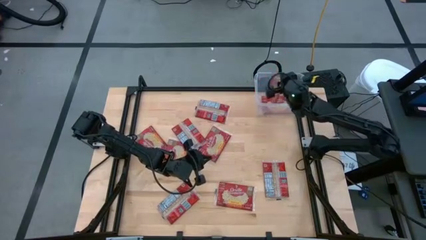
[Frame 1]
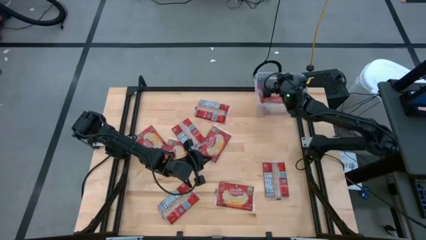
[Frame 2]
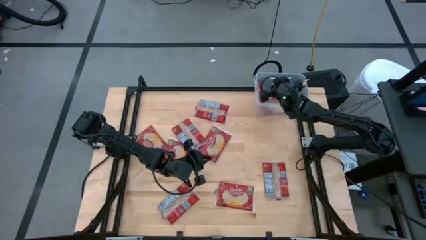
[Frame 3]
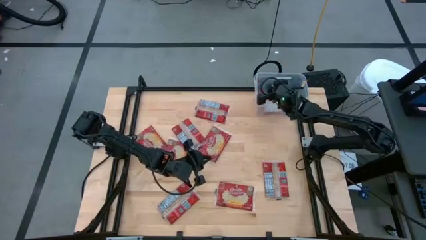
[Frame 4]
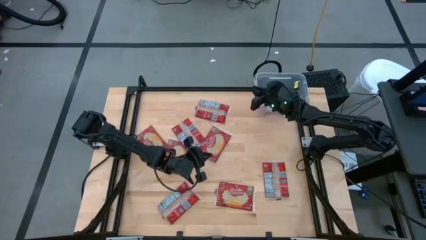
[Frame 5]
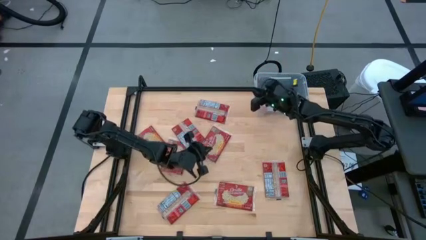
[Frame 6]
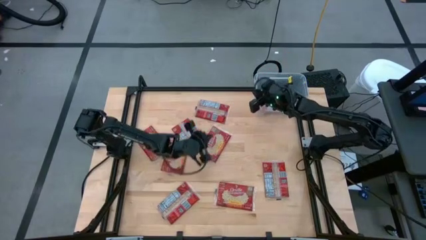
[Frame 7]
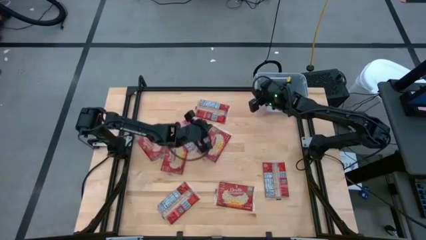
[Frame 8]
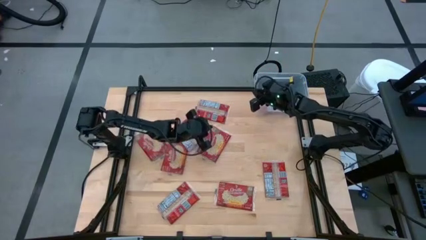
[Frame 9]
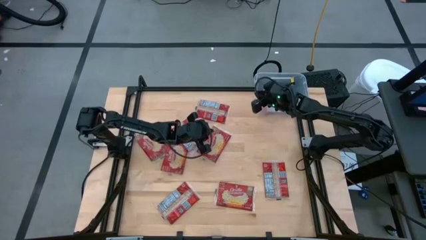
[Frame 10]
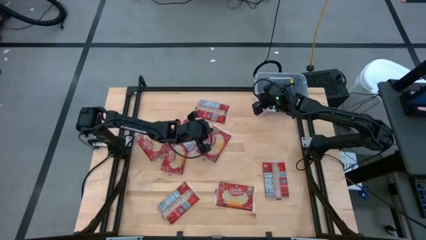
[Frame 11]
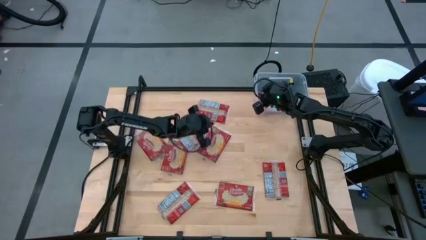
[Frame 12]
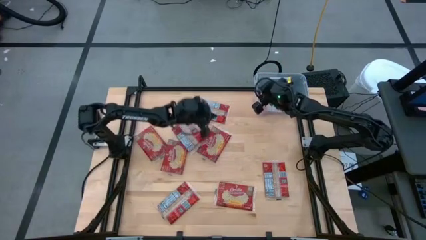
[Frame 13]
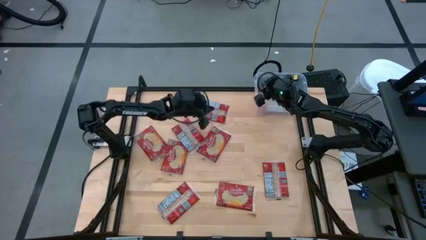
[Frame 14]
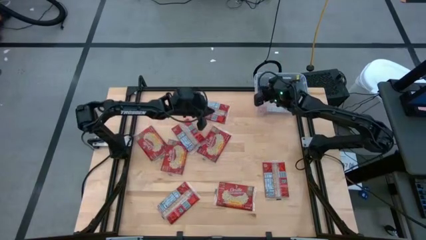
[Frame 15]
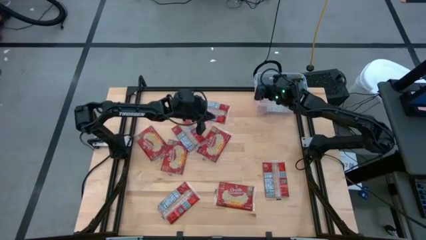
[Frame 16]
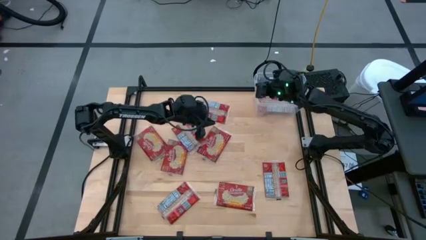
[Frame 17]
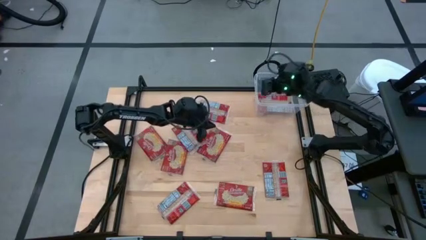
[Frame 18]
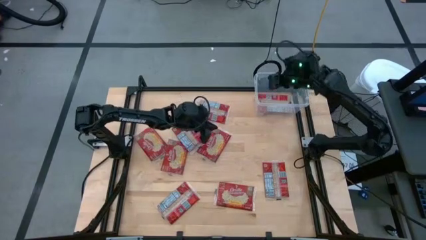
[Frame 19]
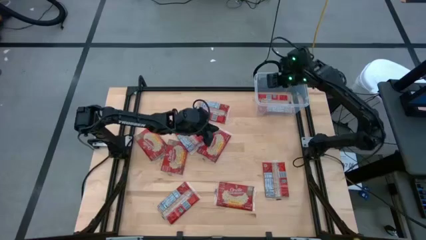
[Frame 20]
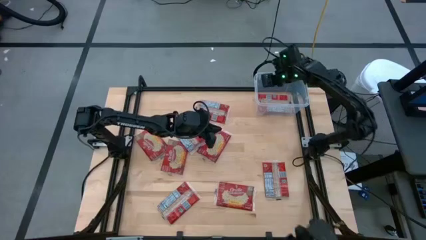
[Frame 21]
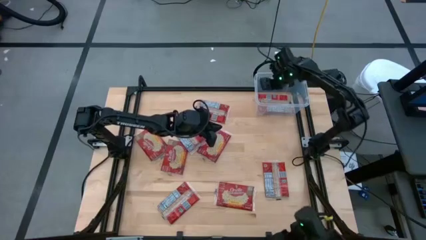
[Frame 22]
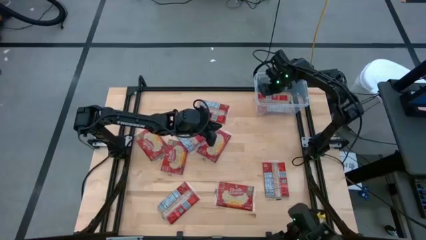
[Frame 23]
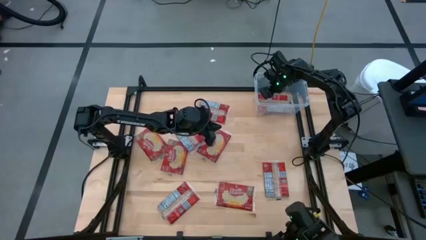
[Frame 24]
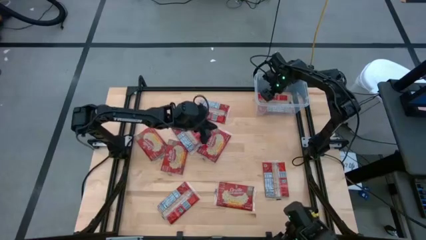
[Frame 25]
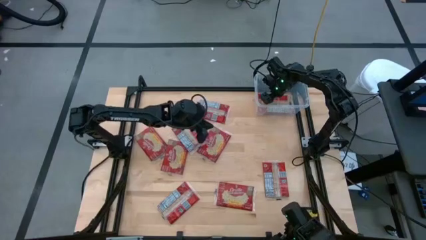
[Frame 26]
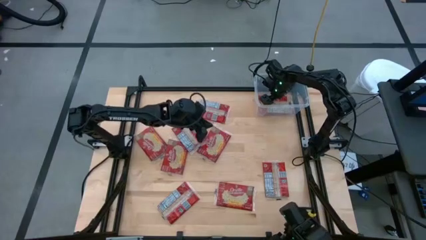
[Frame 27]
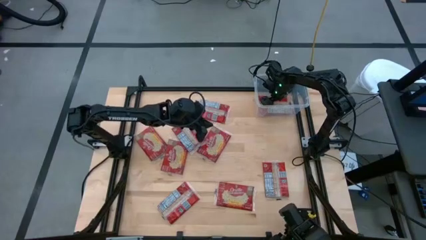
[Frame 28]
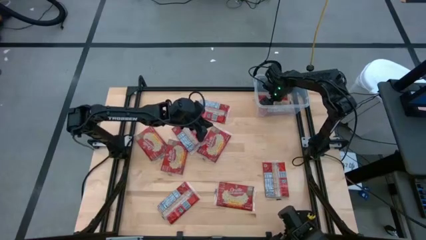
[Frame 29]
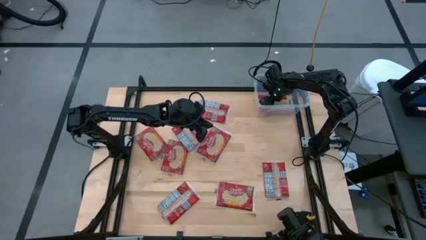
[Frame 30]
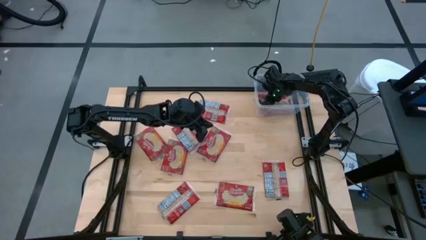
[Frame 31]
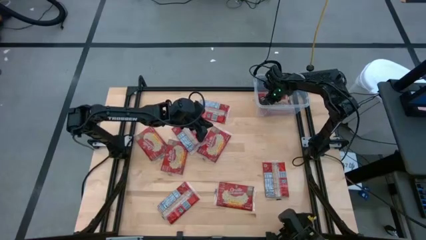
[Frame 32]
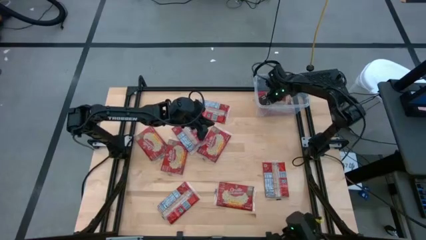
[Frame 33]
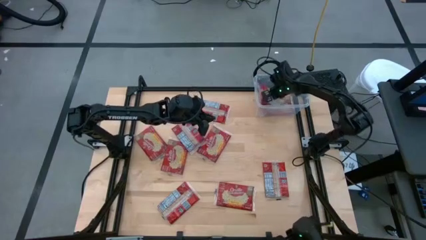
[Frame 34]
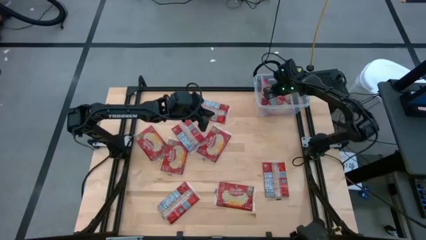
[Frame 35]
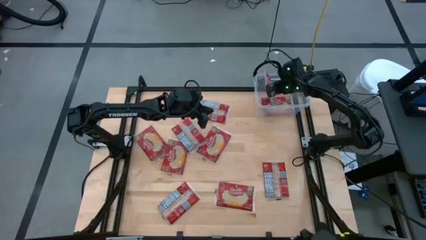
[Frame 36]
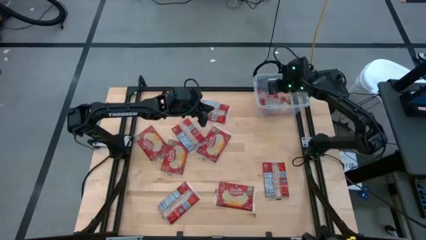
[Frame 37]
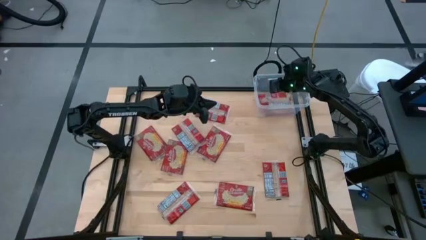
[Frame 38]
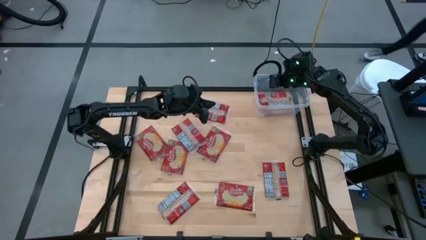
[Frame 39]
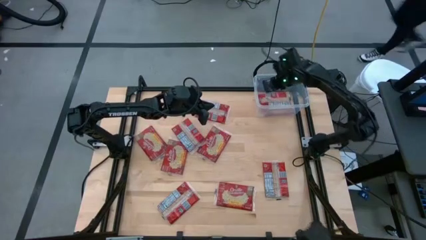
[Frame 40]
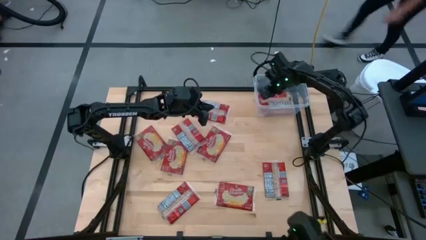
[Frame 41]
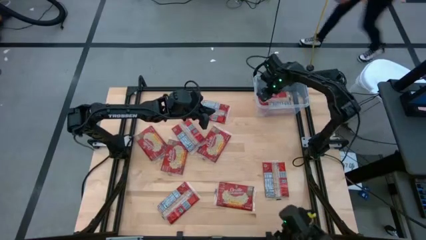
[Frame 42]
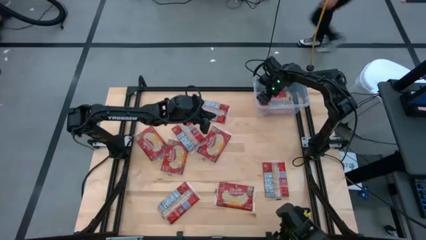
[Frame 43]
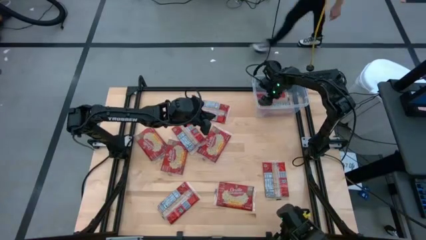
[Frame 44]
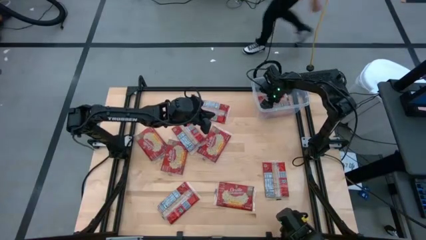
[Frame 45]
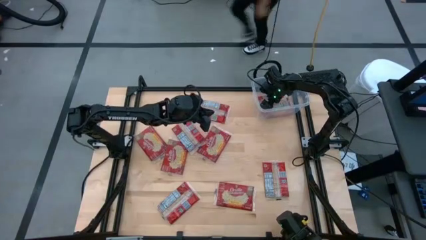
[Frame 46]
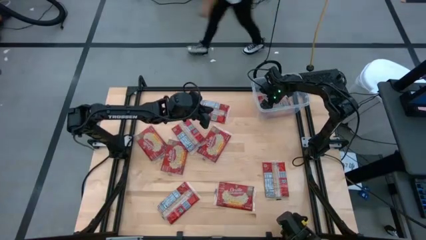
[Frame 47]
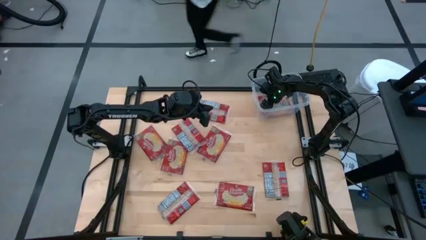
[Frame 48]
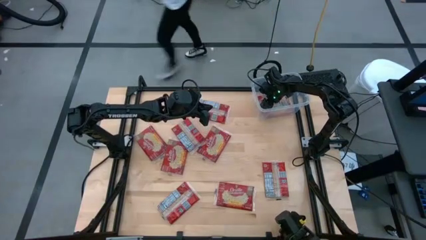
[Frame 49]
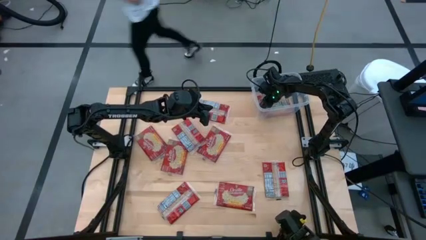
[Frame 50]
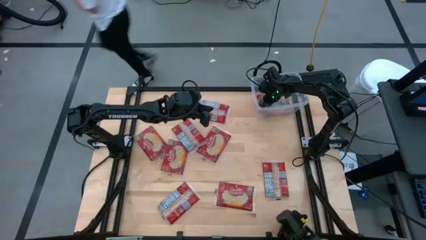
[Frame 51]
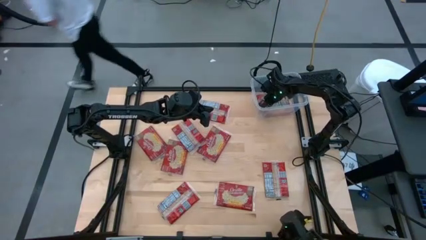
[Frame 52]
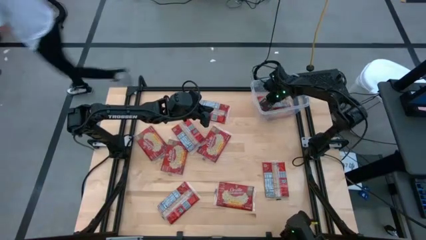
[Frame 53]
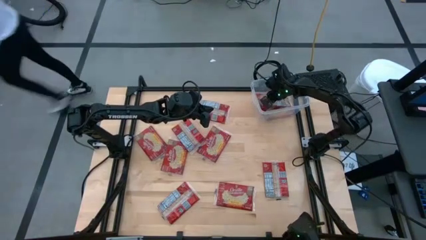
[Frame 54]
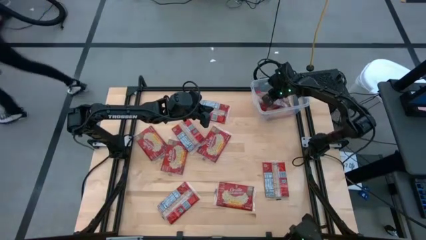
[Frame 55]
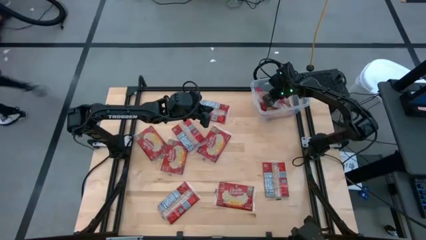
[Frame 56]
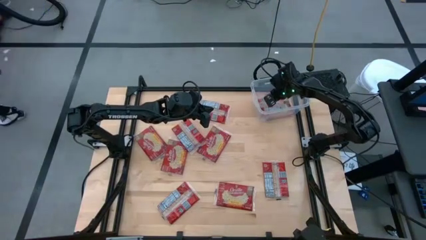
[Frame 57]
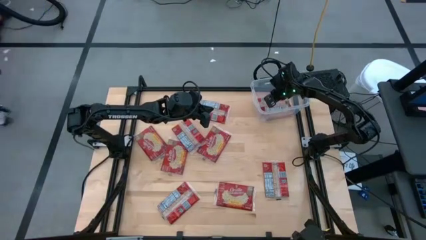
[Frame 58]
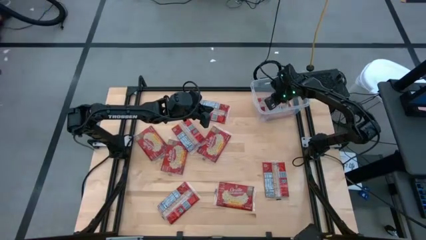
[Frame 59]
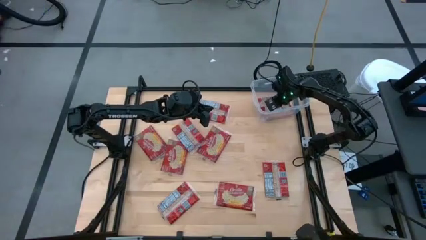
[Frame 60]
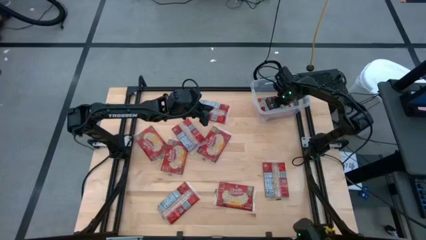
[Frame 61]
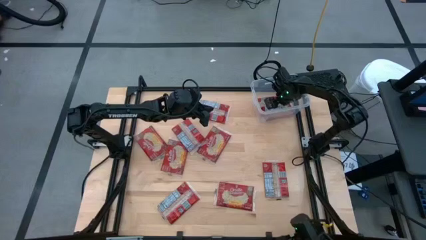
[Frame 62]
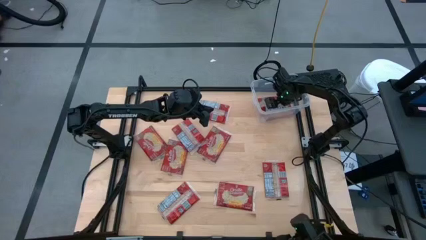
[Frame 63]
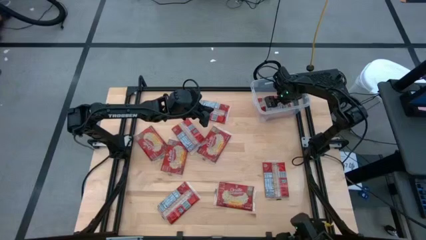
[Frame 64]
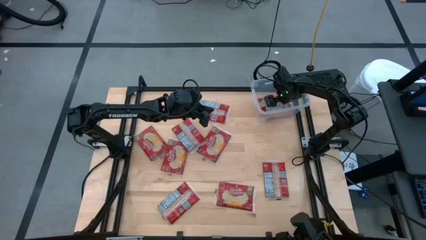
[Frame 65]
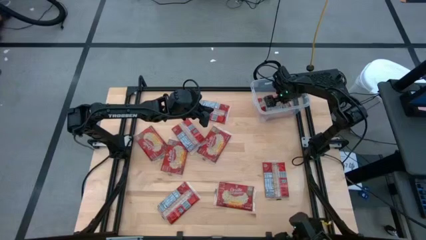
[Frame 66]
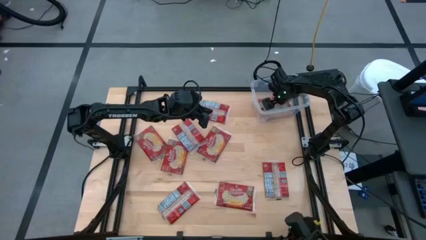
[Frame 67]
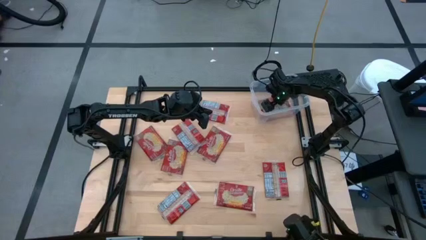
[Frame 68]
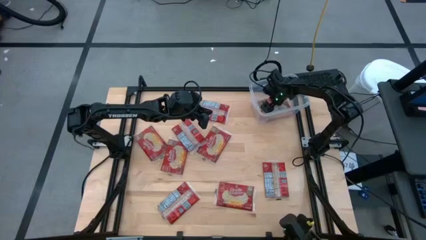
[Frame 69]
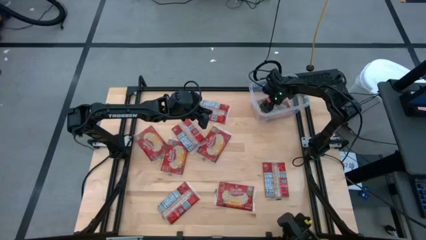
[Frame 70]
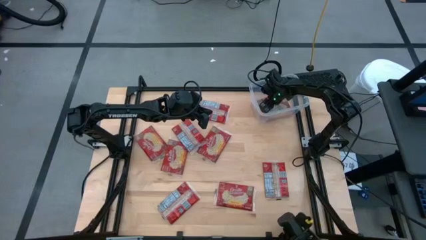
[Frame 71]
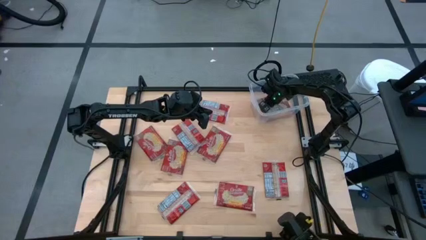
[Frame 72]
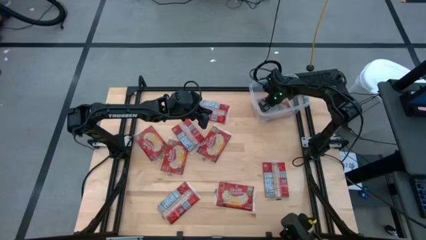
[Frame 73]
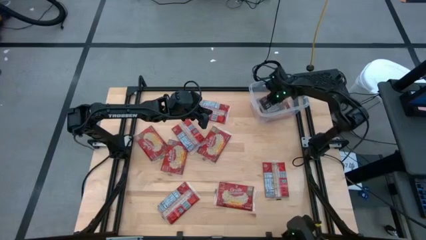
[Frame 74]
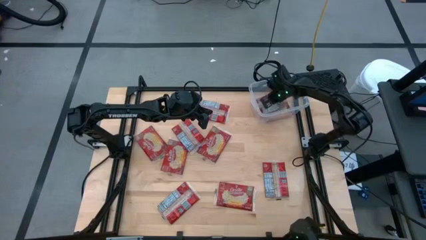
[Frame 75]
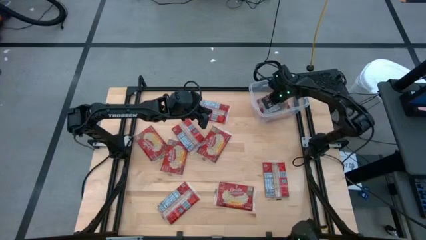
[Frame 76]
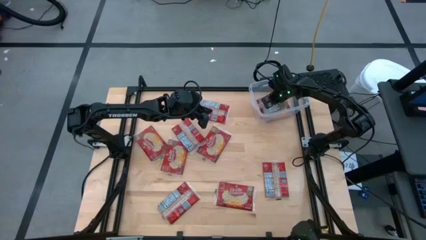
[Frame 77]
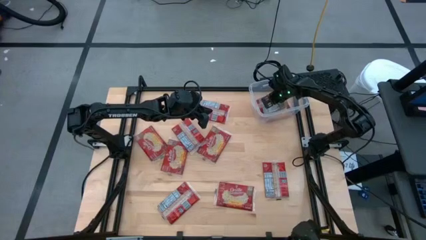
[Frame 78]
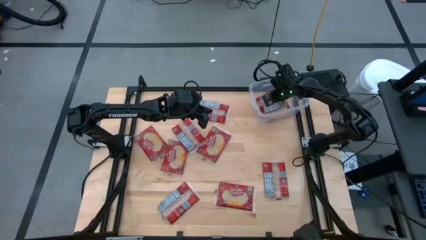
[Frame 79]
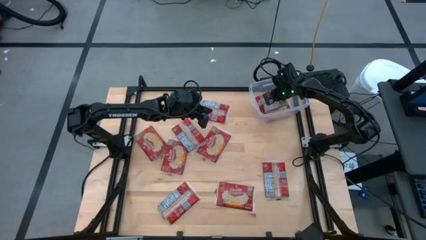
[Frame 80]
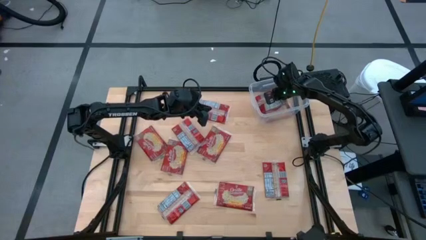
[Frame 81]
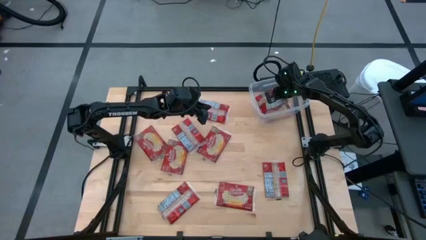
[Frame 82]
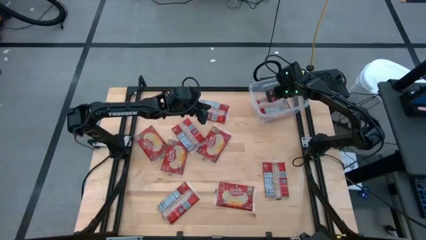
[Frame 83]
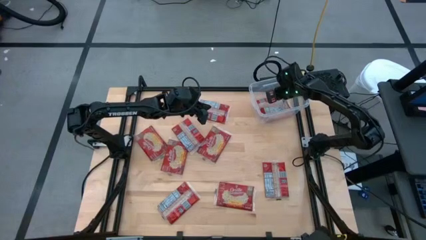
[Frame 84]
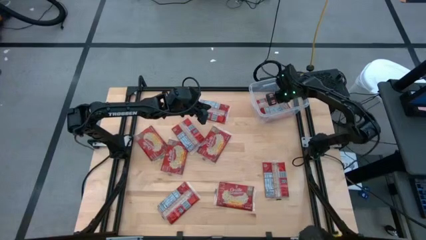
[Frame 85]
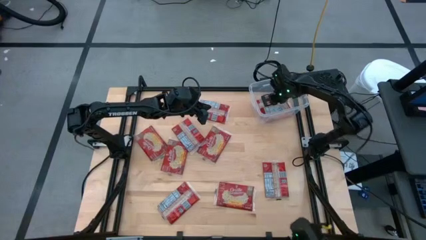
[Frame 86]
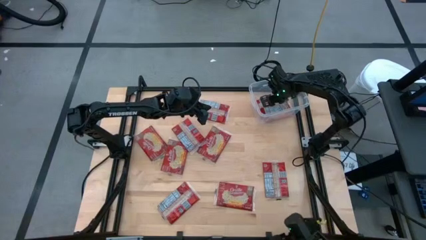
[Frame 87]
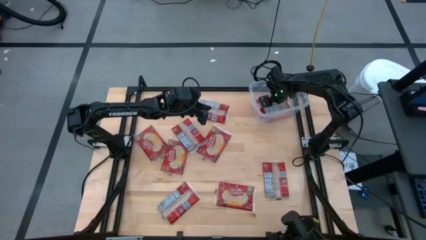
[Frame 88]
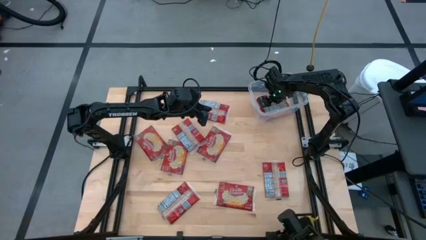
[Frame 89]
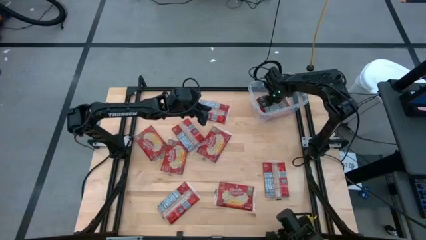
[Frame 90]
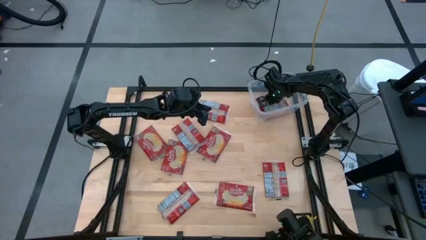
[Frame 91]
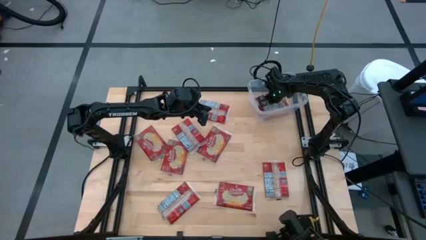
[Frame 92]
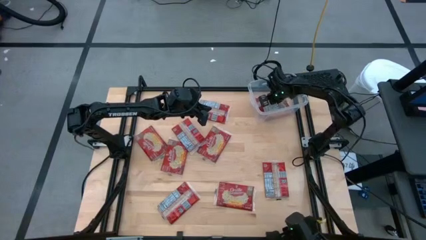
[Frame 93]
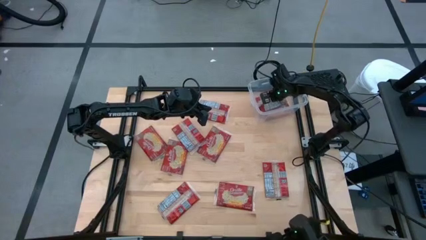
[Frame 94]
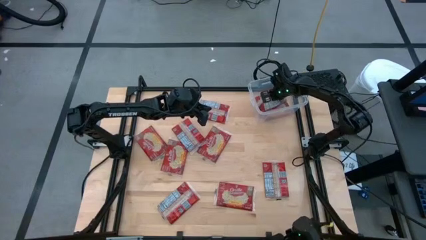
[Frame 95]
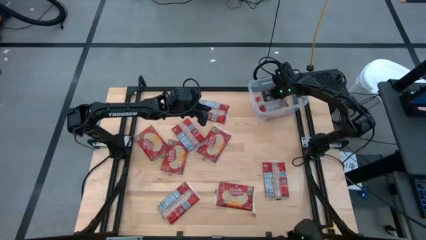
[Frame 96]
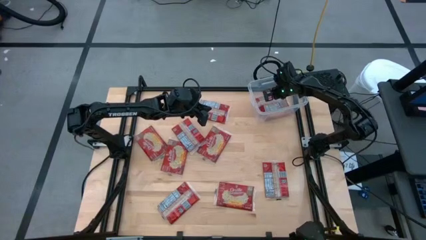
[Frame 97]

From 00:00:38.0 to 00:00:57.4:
Task: Sort popcorn bags into baskets
Adjust the popcorn bag in the transparent container
